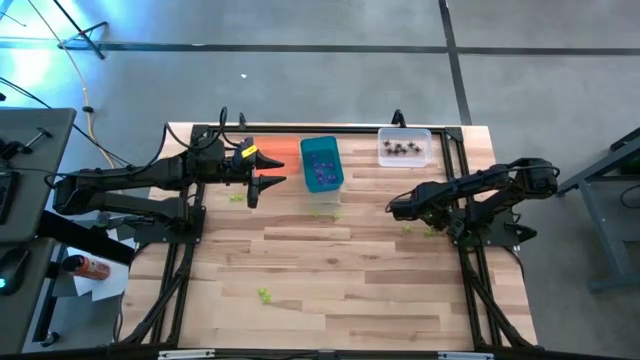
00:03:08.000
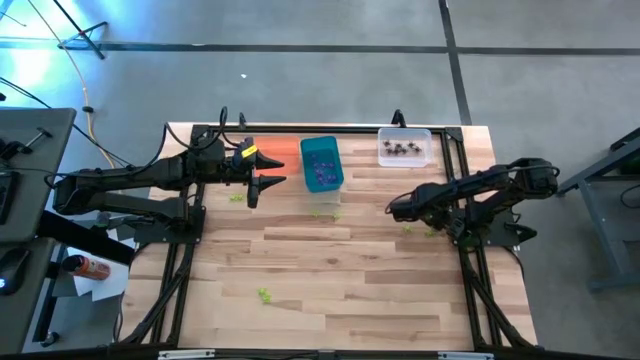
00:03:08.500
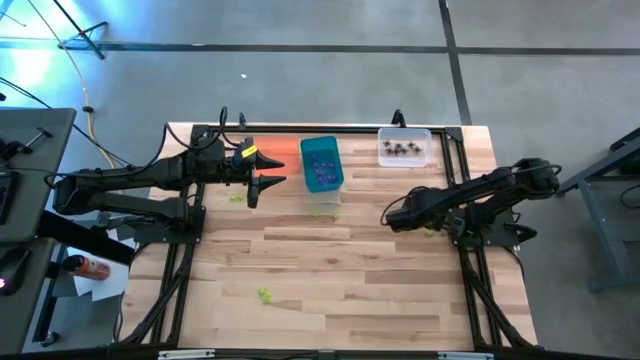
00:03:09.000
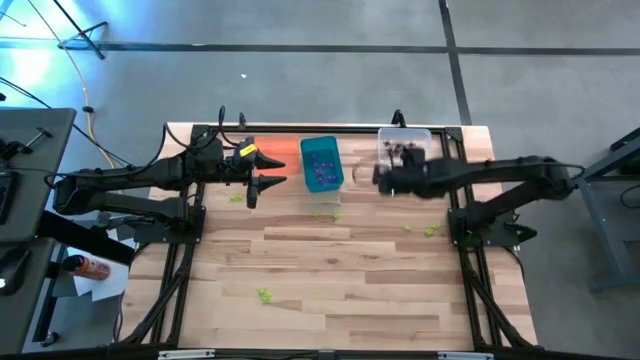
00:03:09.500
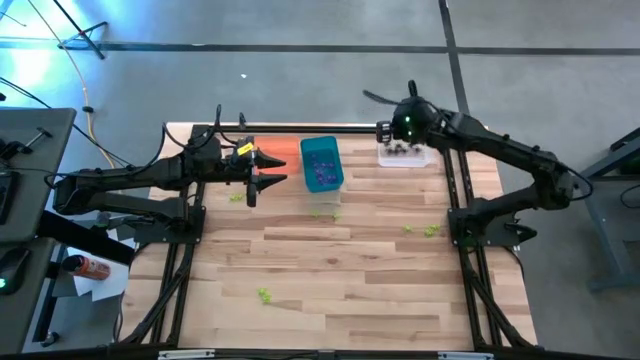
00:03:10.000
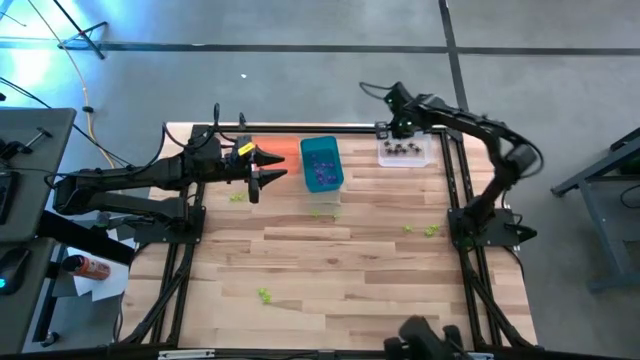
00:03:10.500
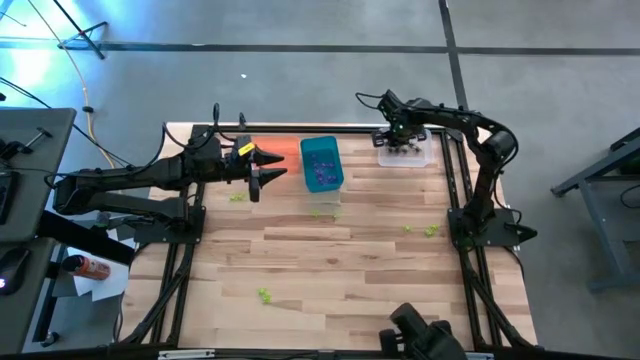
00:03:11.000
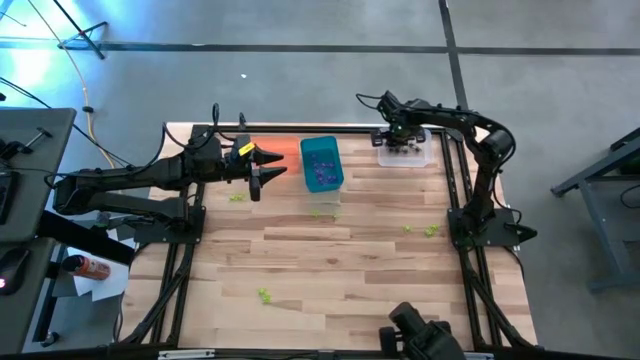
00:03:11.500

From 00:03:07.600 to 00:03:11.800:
Task: Sort Halloween decoration
Put the black spider toy into the transparent bin

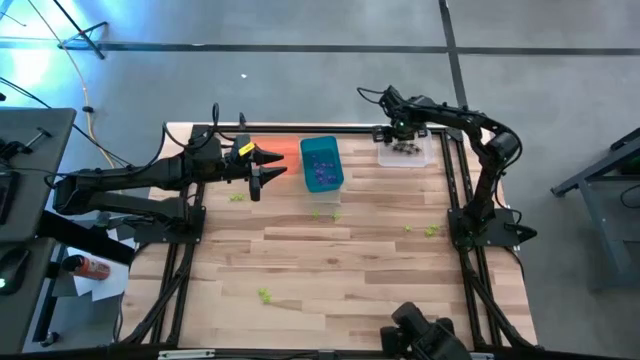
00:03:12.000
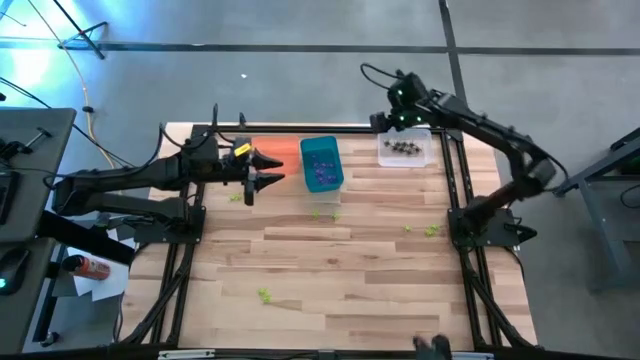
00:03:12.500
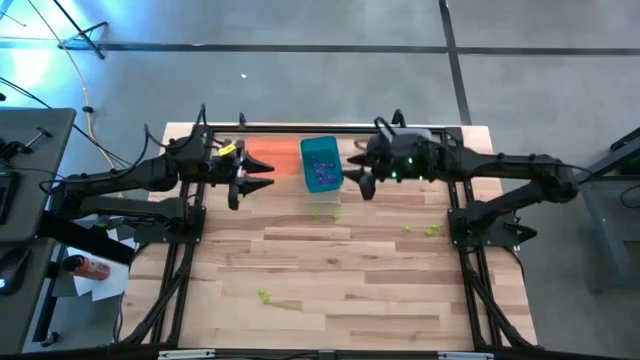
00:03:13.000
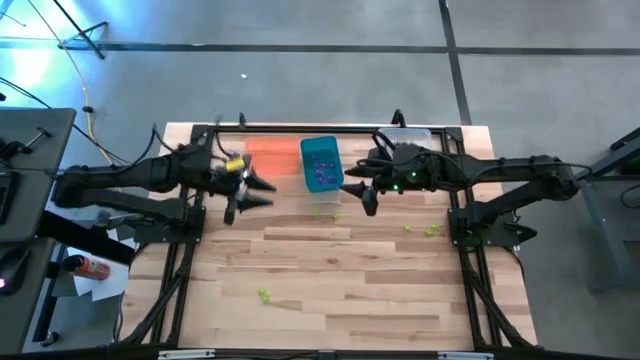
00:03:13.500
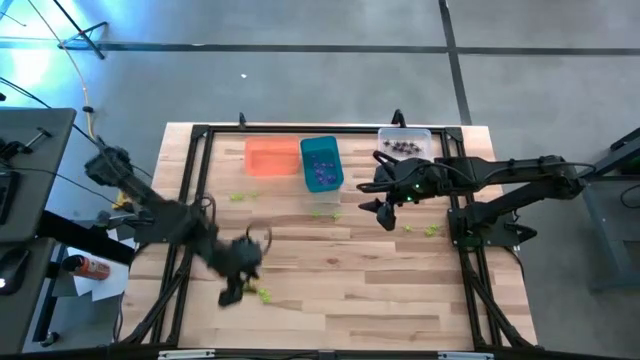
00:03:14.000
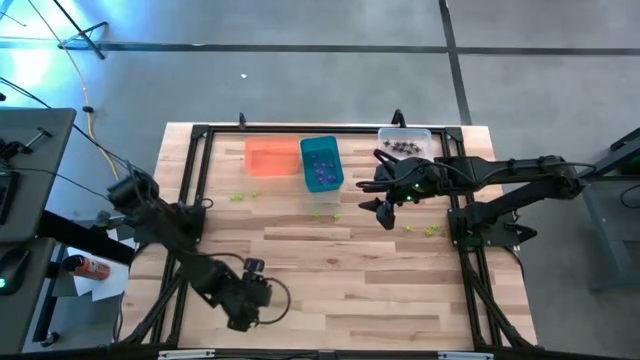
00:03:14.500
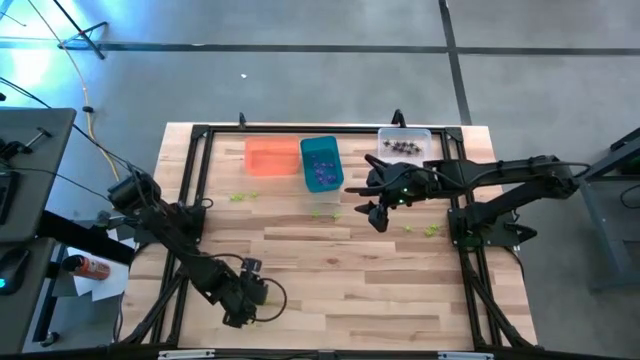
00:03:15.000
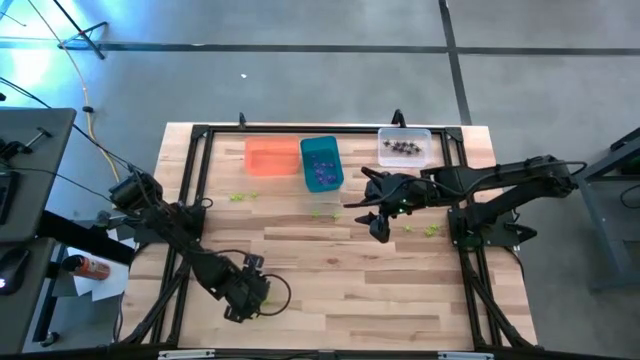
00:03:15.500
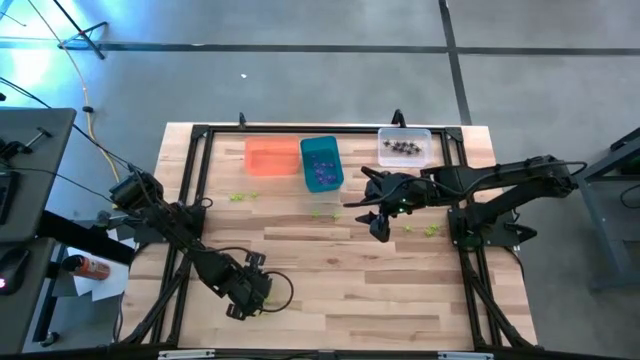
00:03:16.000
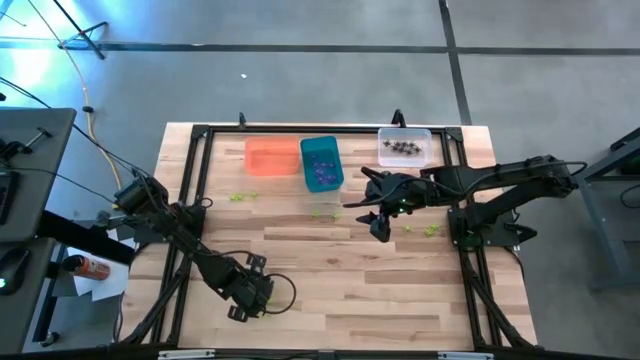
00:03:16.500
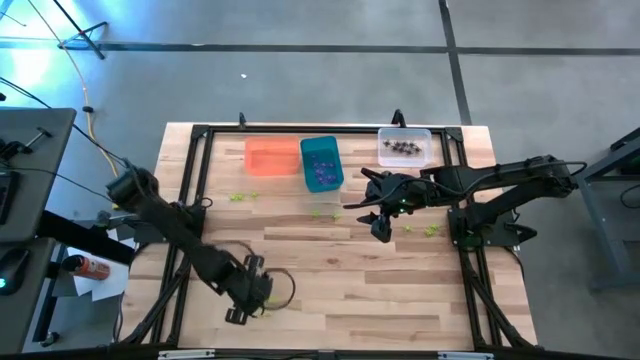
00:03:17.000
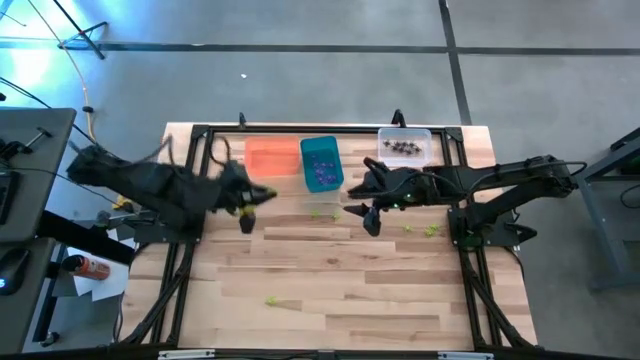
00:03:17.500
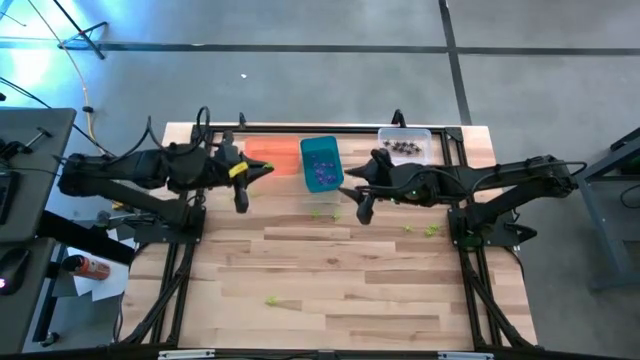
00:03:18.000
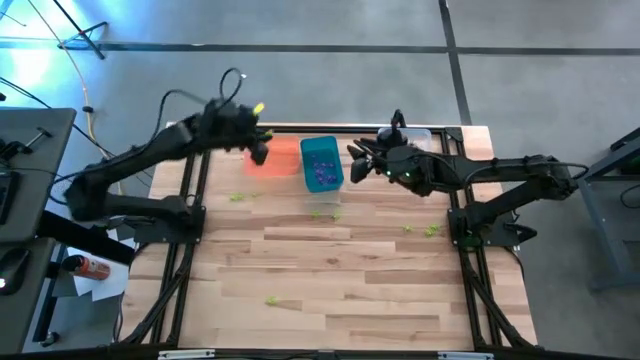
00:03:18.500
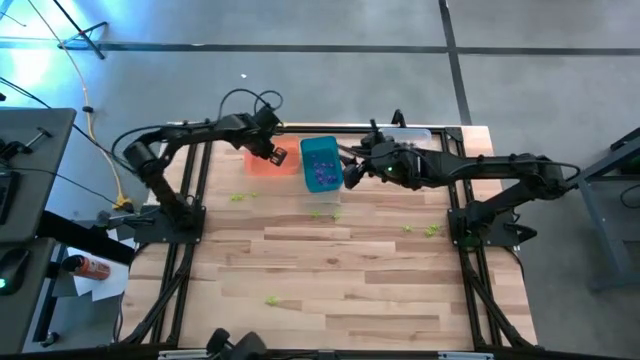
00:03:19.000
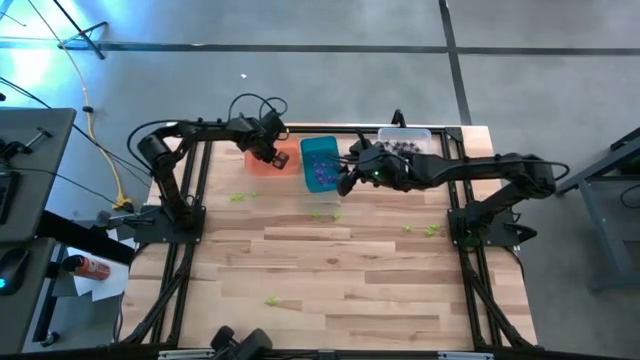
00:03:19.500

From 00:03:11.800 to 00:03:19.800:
Put the green spider toy into the orange bin

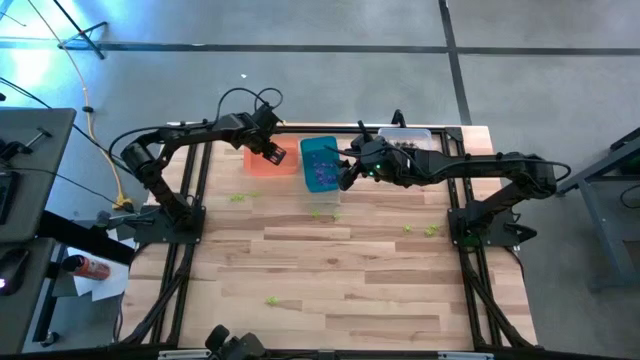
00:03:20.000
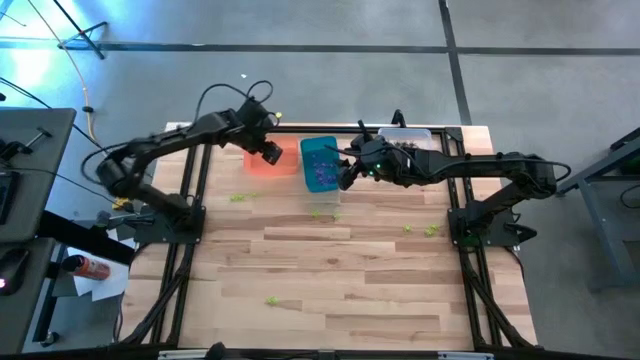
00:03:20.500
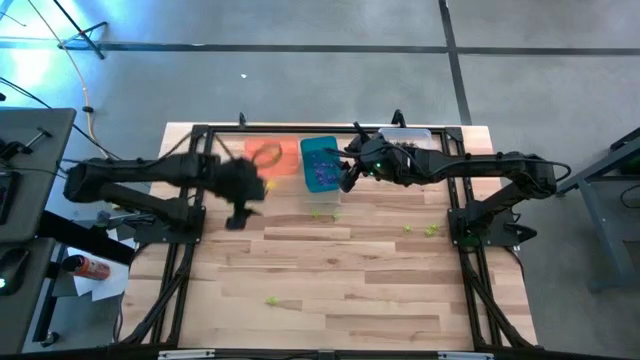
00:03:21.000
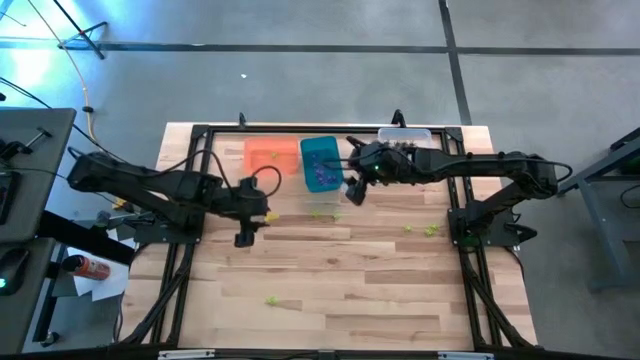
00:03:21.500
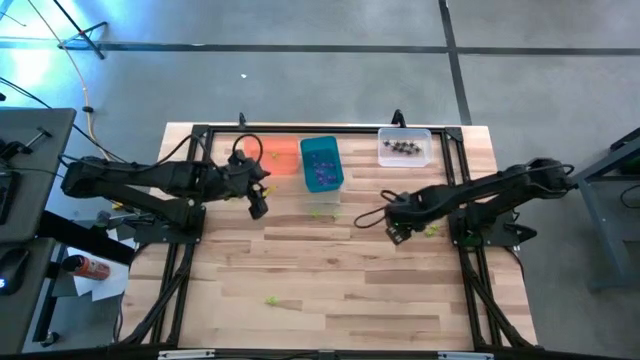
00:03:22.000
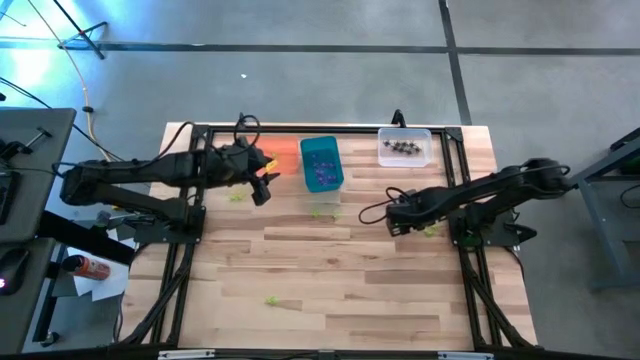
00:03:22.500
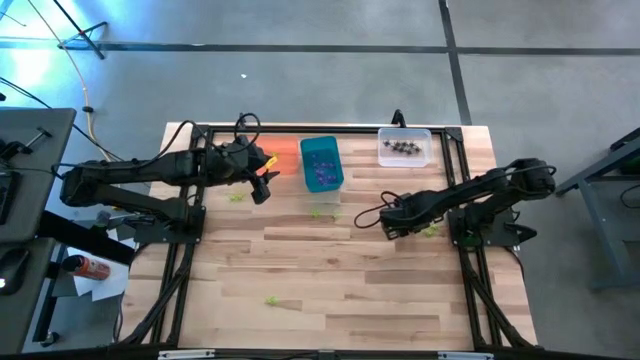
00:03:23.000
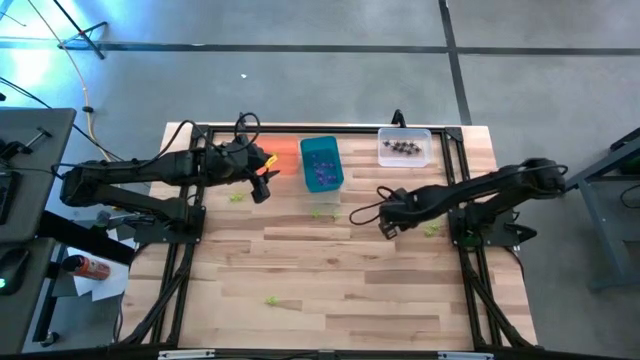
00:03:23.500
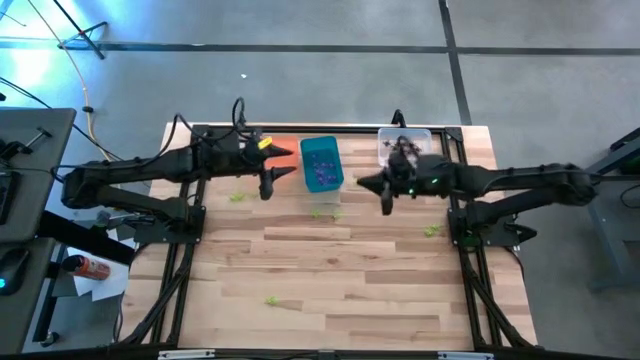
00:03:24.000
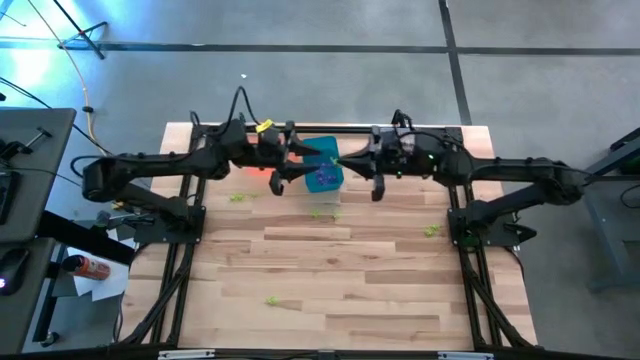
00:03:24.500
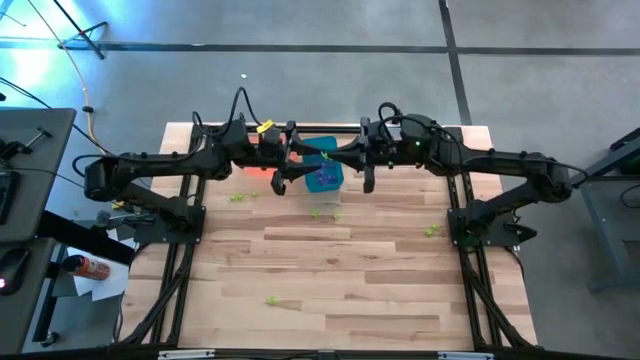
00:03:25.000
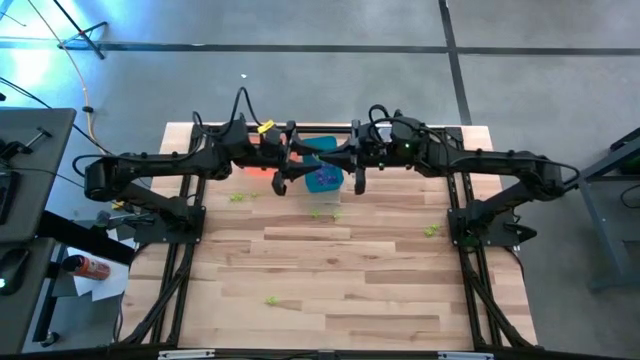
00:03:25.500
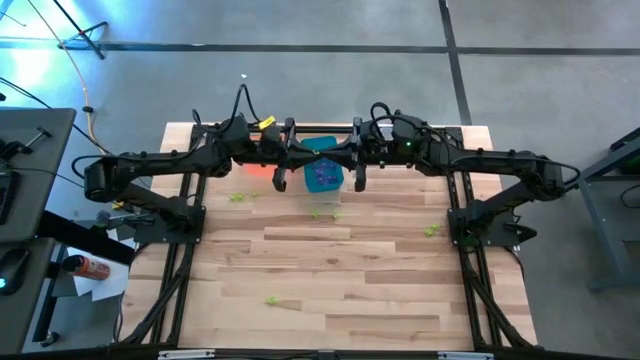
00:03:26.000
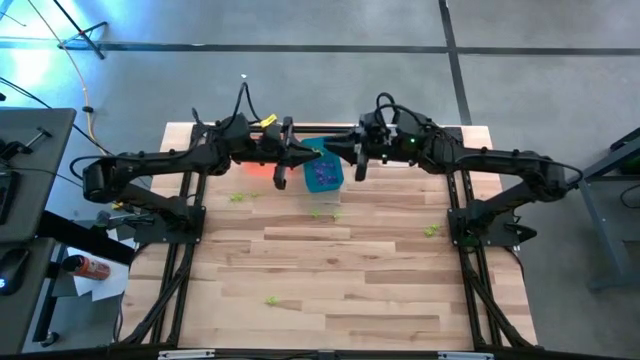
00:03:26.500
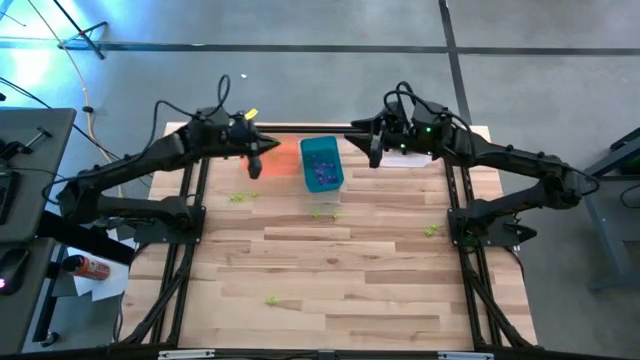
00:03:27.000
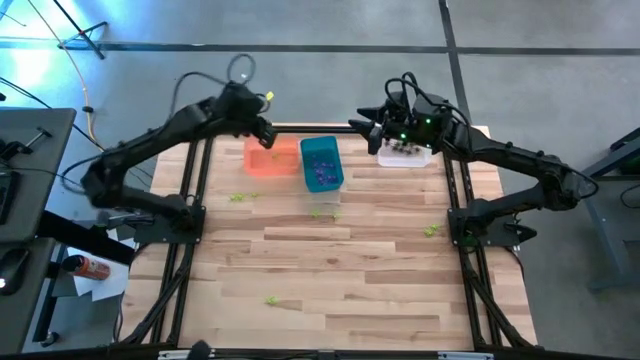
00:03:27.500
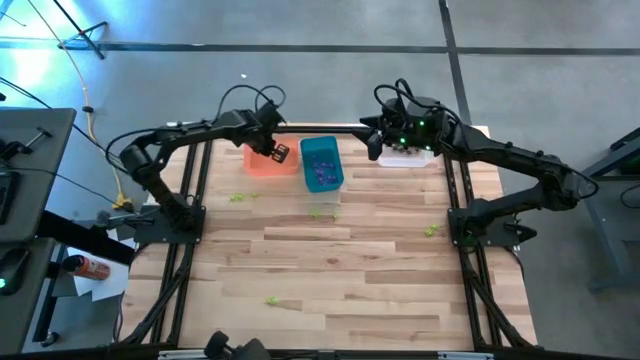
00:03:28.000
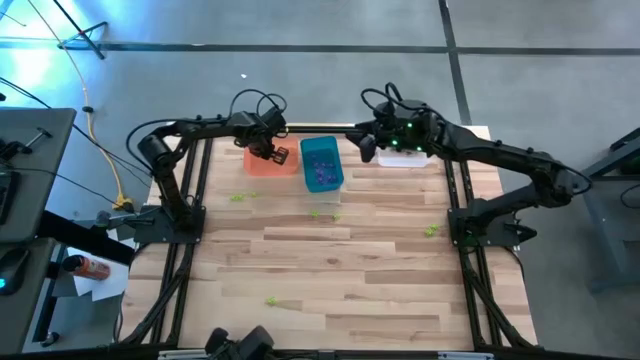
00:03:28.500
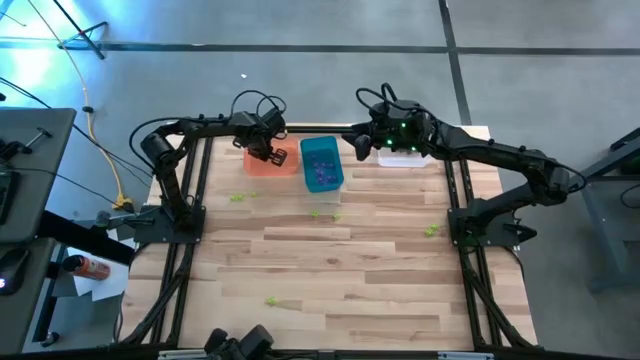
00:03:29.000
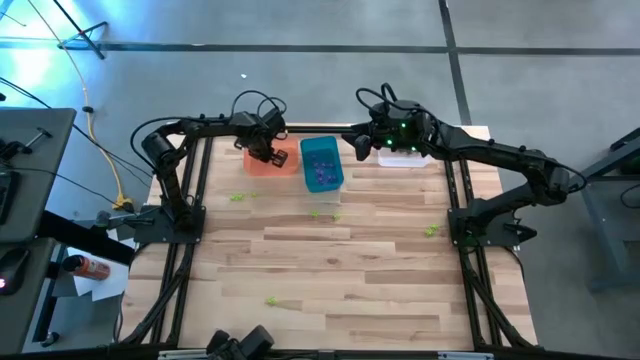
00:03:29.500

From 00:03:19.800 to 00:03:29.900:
Put the green spider toy into the orange bin
